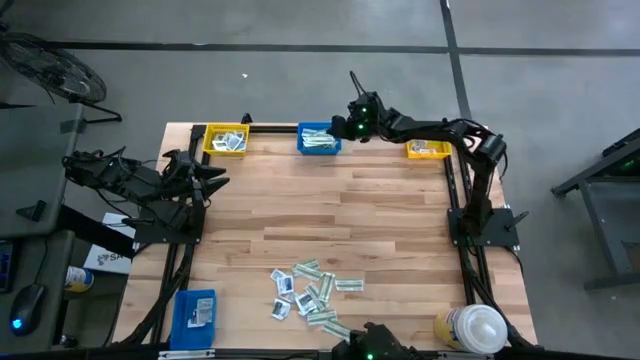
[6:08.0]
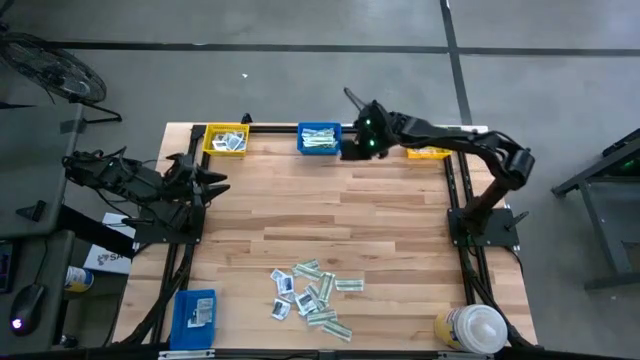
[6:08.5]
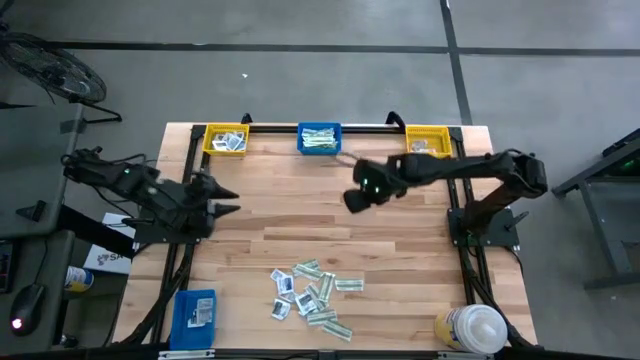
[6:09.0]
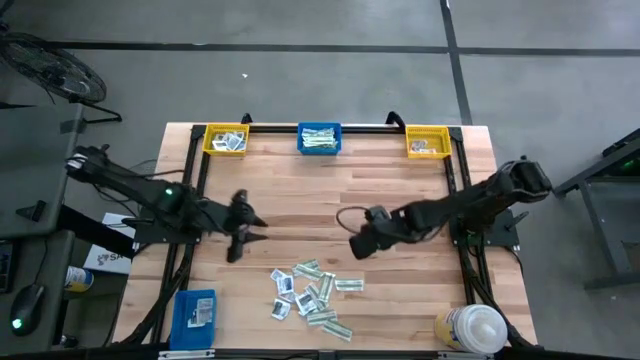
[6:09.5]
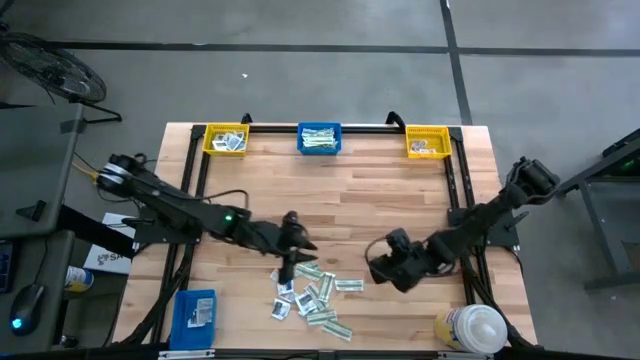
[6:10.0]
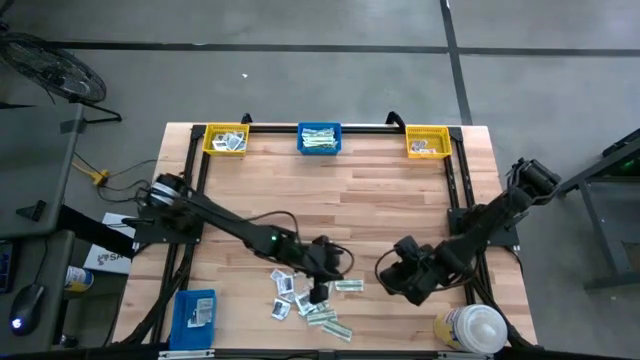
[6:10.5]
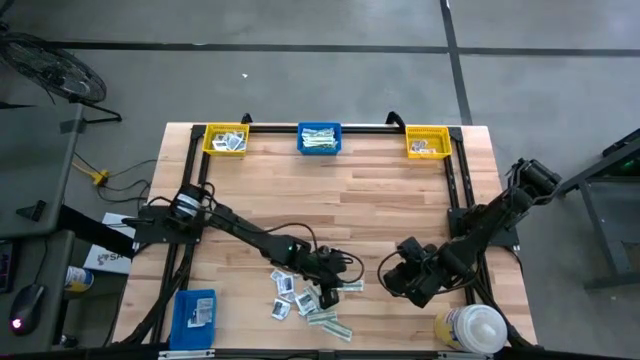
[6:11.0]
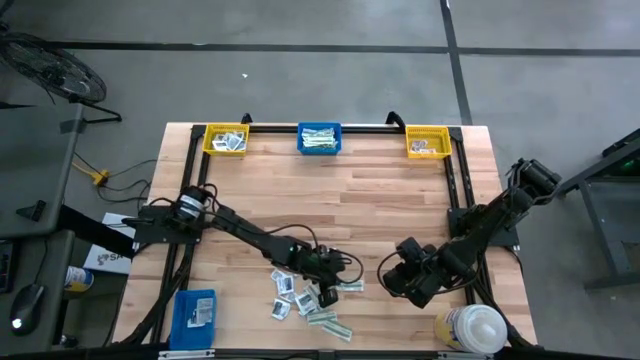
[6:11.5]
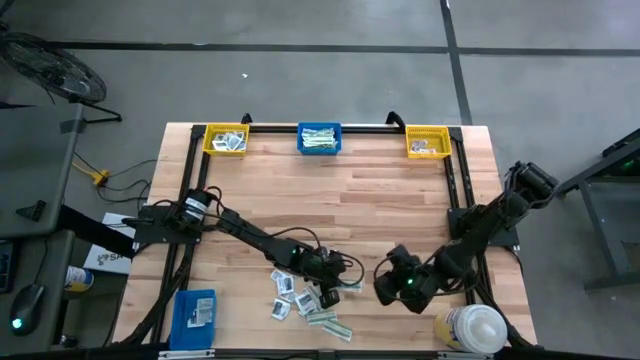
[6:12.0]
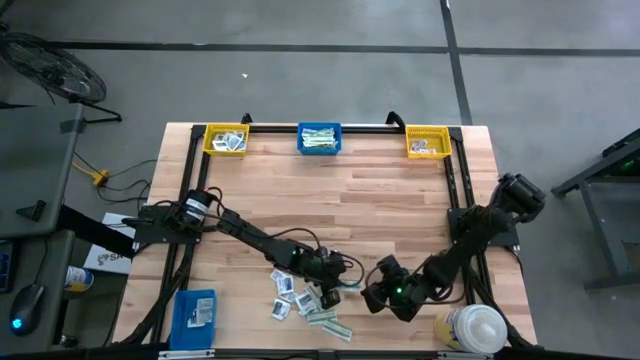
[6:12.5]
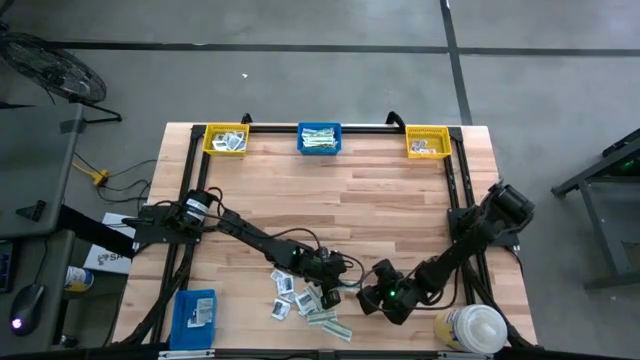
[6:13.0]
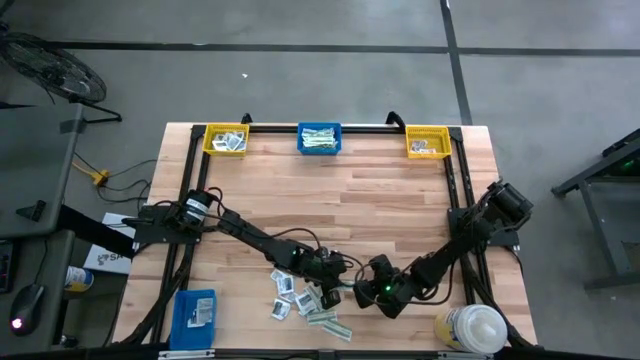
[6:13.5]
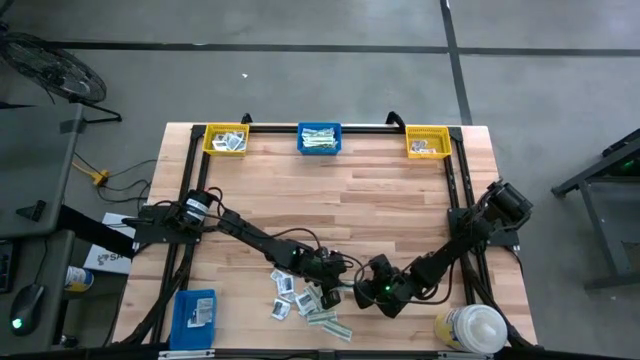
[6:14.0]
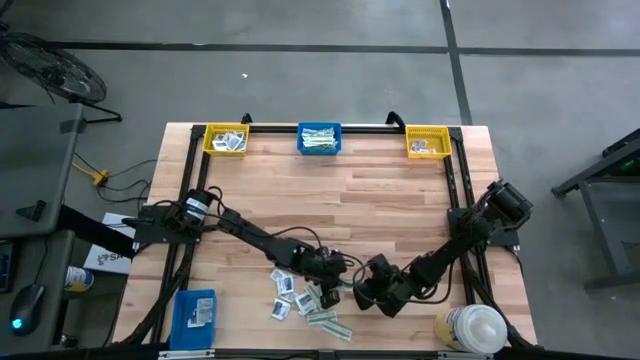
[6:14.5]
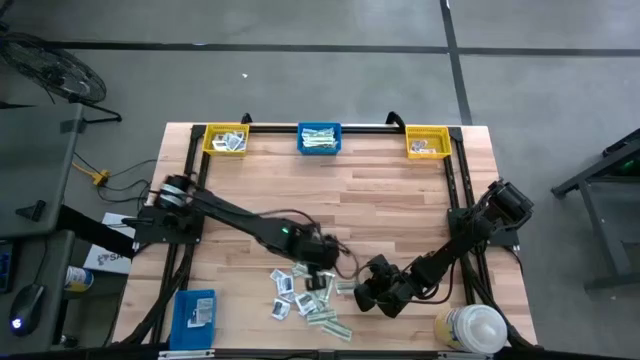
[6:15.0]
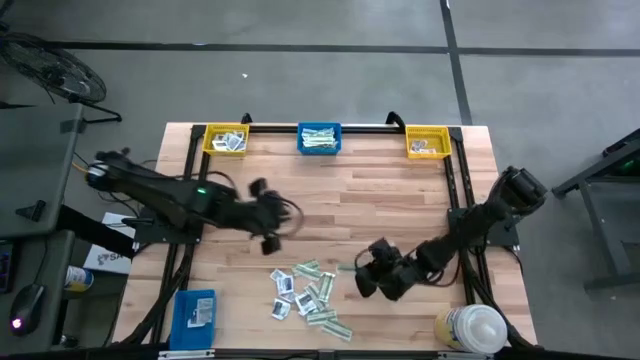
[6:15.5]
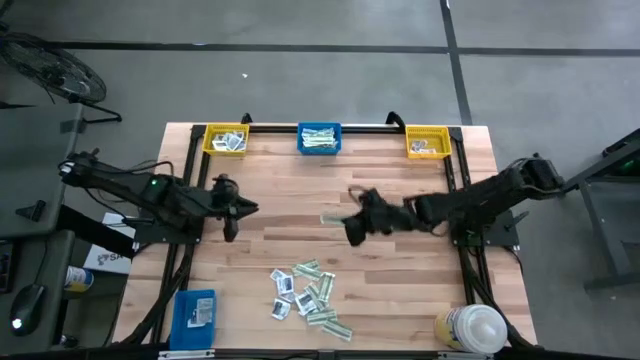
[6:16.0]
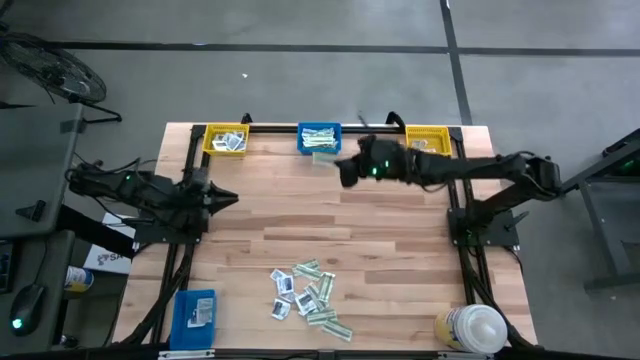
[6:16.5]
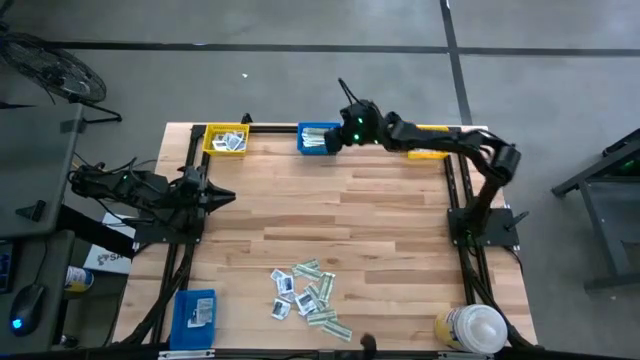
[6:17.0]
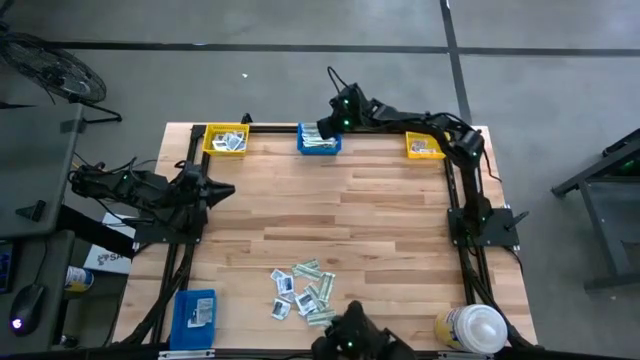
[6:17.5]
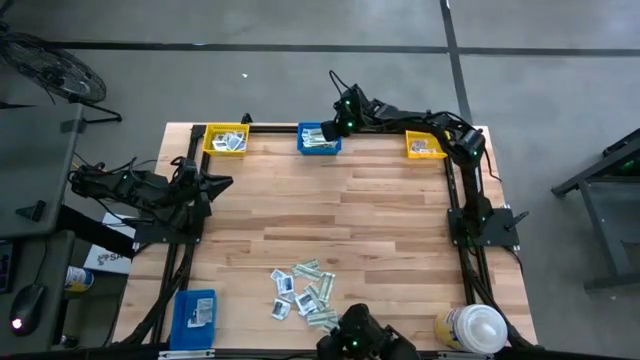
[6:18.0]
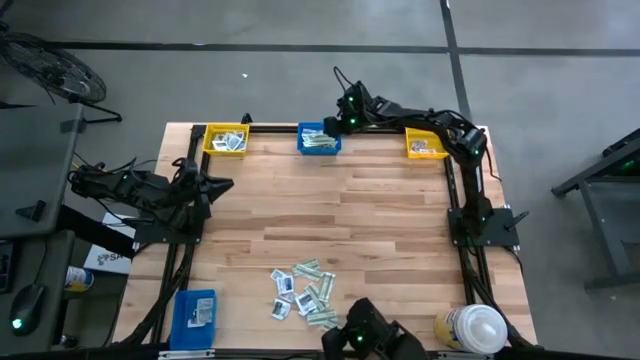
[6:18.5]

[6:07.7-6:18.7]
Task: Pick & Place First Aid Supplies
Put the green bandage pack into the top blue bin

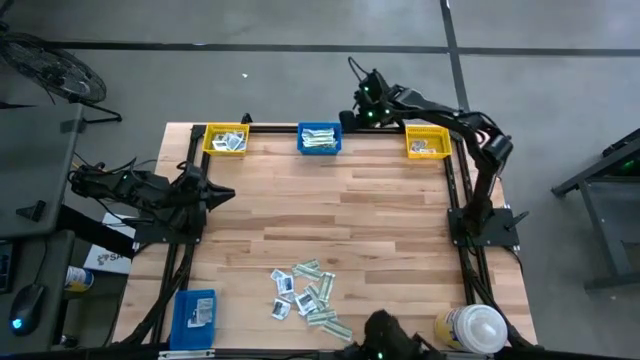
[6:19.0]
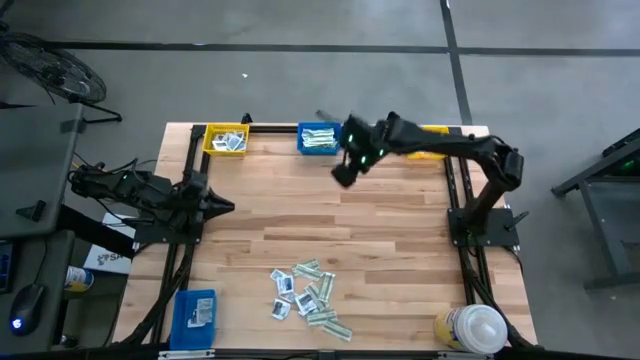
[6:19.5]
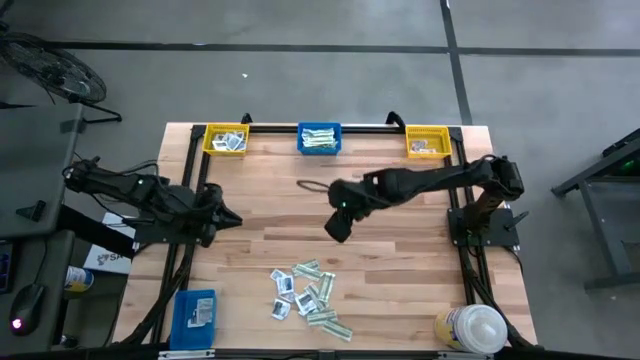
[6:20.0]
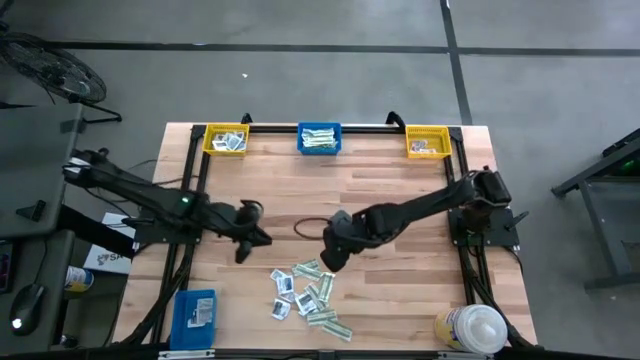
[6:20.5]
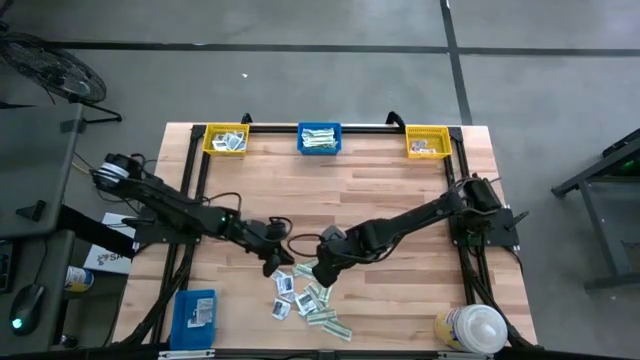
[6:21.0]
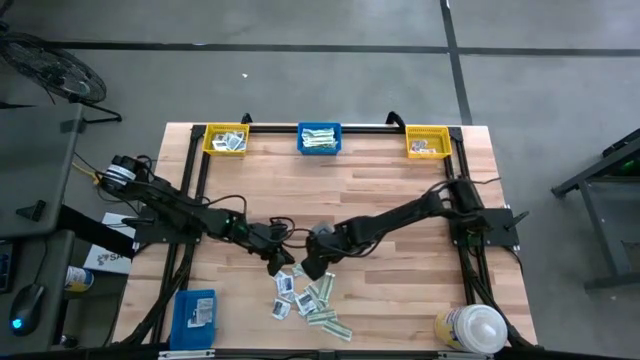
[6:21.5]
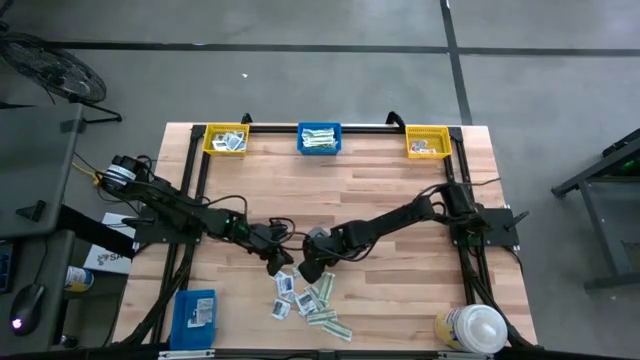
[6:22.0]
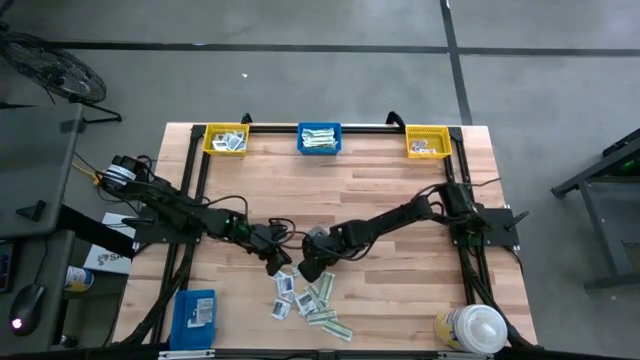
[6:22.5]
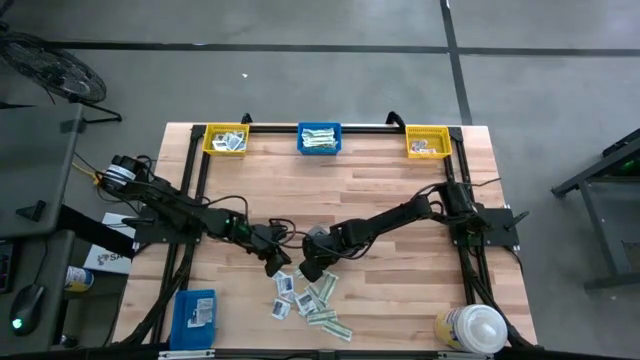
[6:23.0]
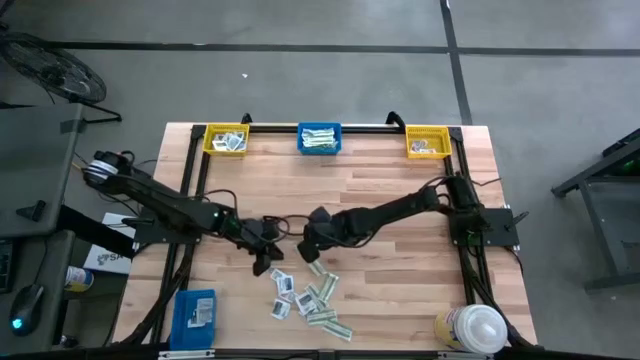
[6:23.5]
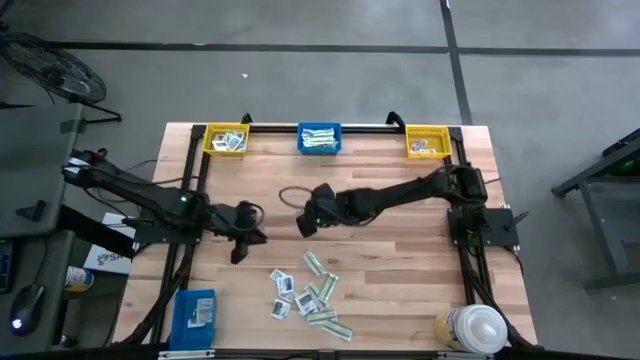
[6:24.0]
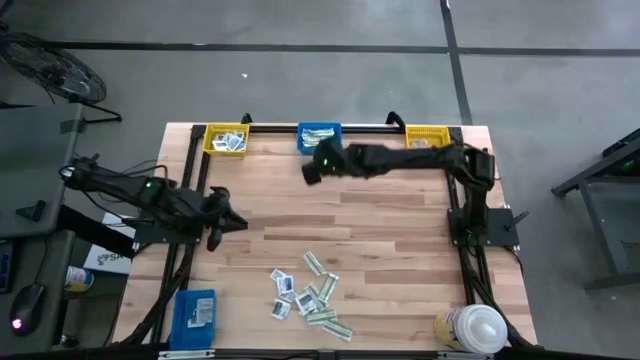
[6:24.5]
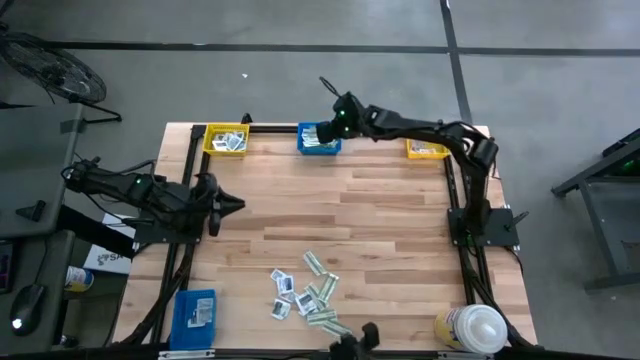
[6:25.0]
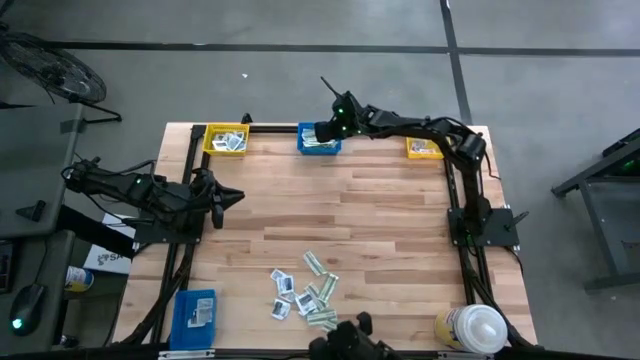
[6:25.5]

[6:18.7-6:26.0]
Put the green bandage pack into the top blue bin

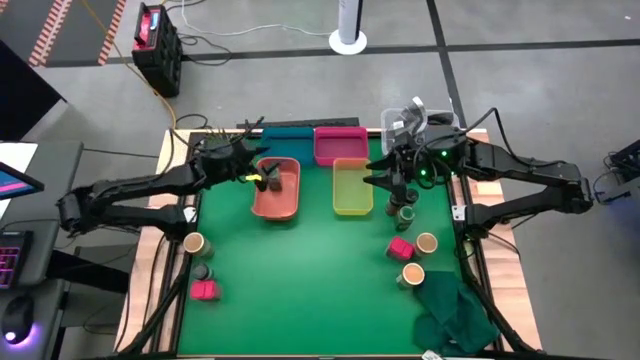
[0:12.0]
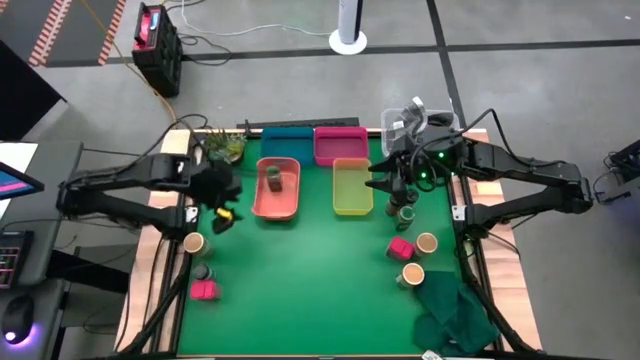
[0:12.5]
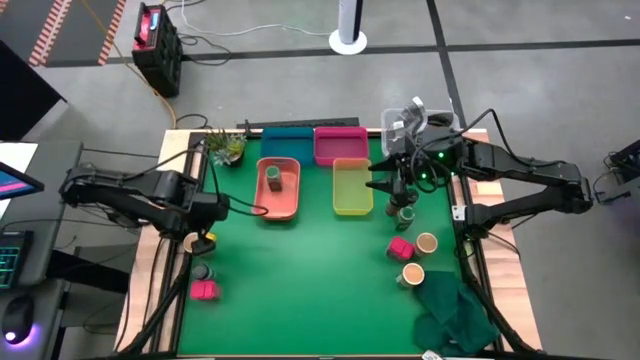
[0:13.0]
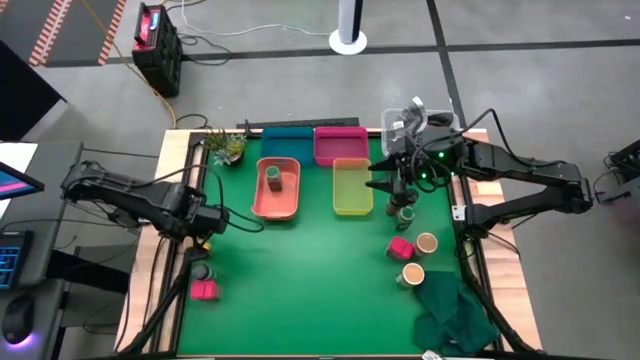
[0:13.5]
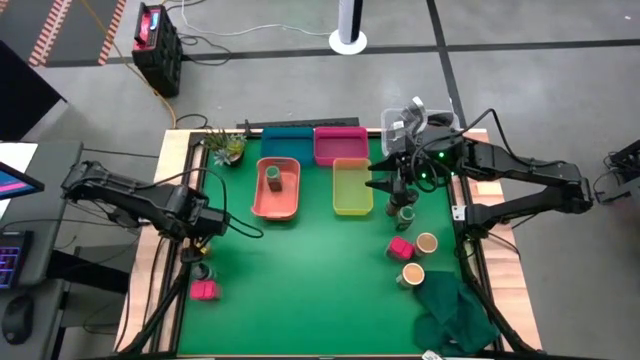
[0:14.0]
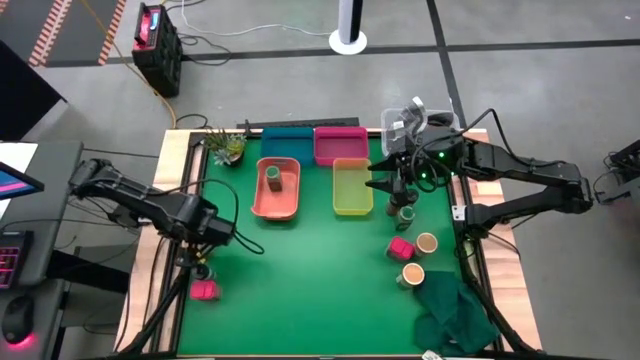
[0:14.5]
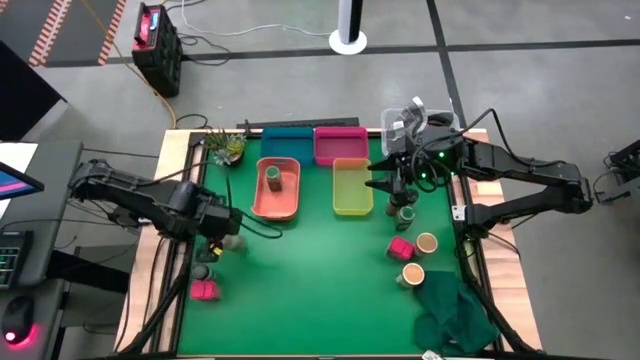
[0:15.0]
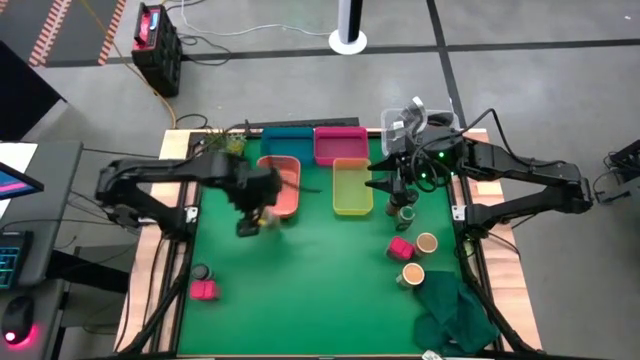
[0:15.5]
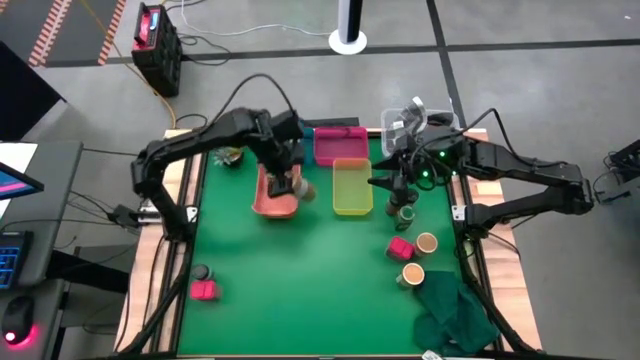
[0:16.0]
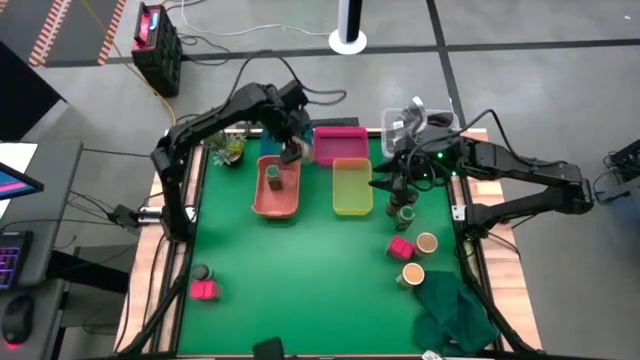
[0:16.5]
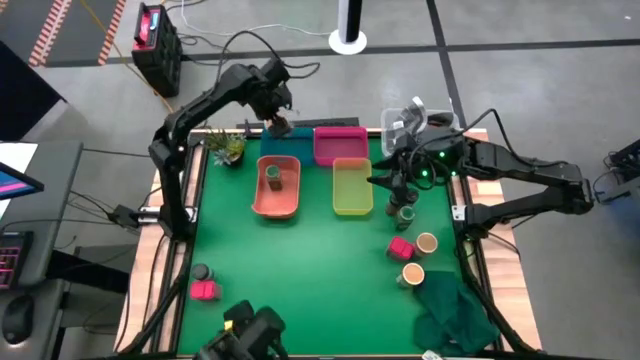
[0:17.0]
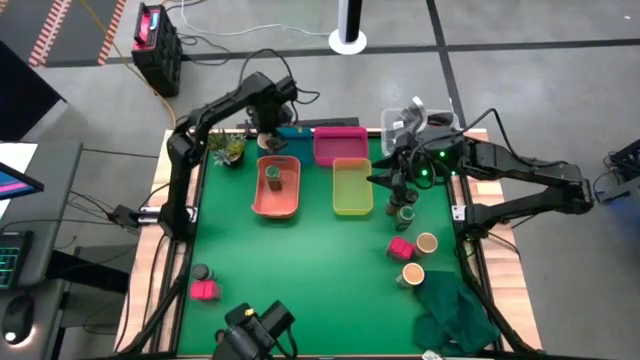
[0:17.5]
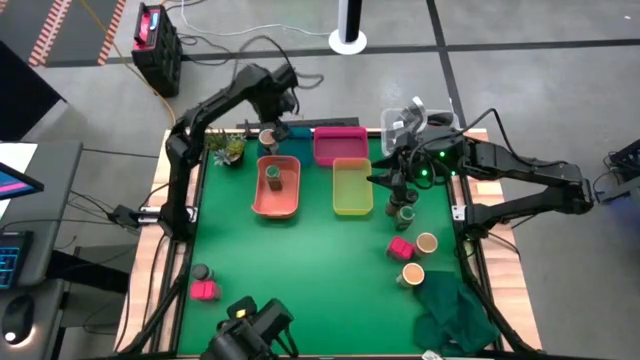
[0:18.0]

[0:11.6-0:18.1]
Task: Sort spices by type
Put the left brown seasoning bottle into the blue bin
